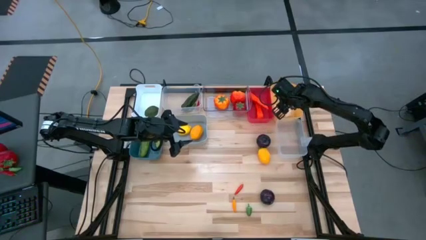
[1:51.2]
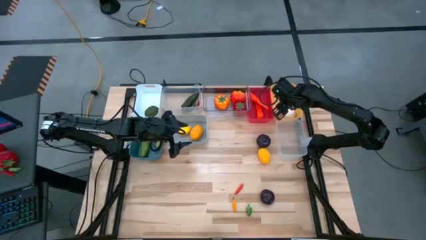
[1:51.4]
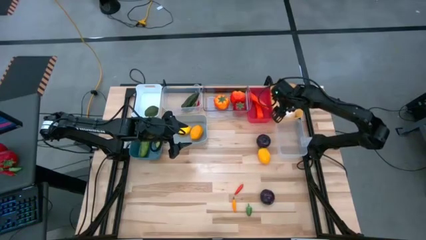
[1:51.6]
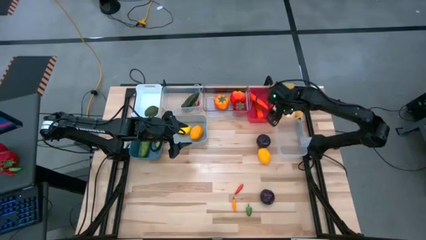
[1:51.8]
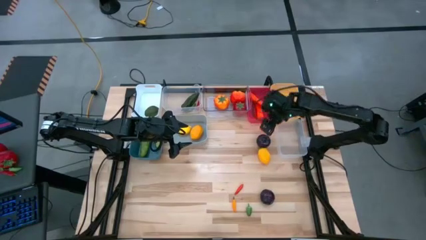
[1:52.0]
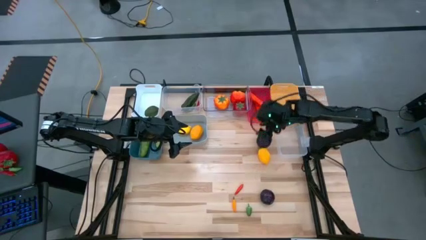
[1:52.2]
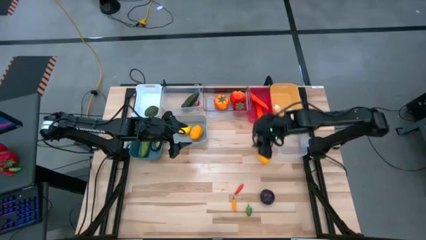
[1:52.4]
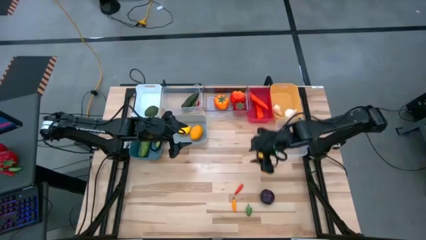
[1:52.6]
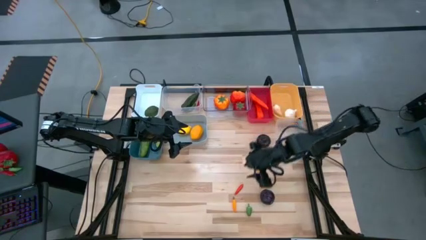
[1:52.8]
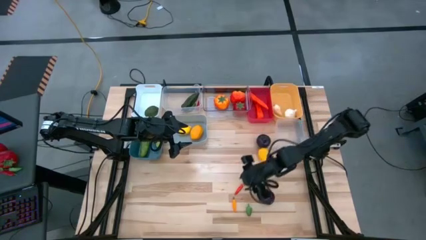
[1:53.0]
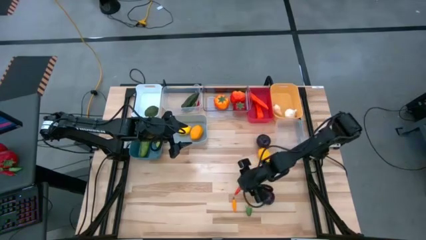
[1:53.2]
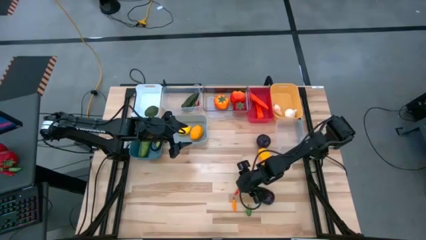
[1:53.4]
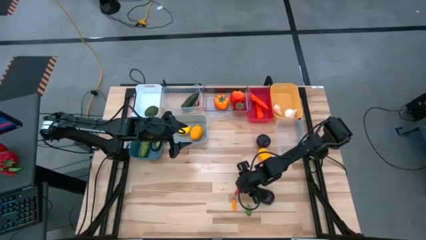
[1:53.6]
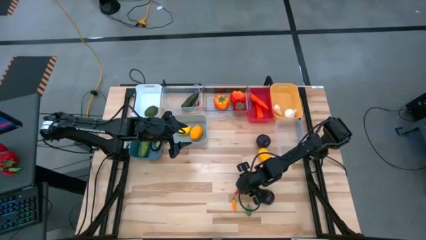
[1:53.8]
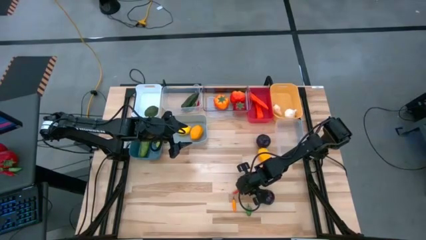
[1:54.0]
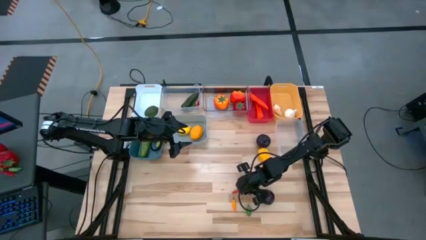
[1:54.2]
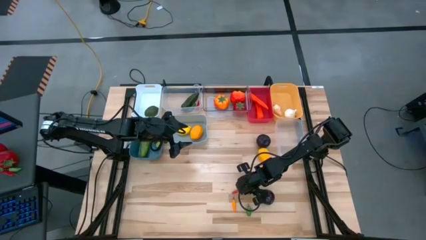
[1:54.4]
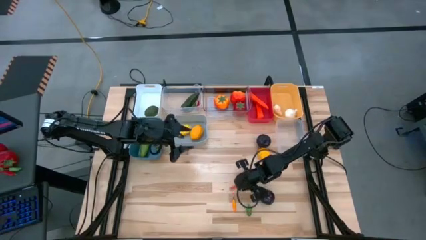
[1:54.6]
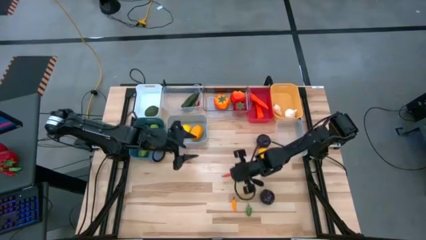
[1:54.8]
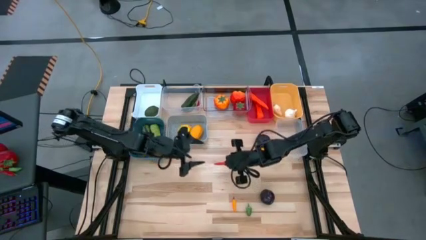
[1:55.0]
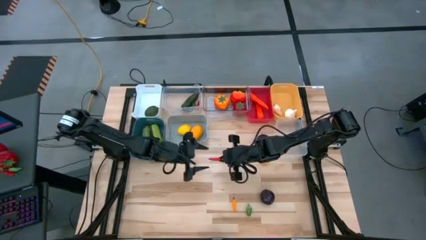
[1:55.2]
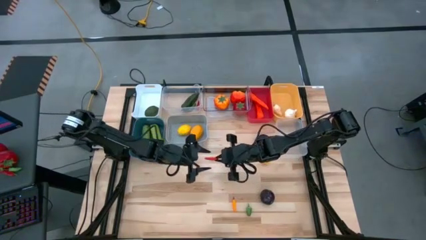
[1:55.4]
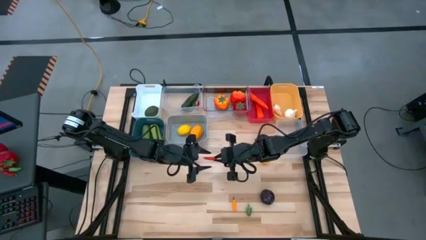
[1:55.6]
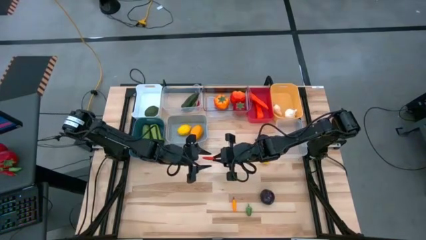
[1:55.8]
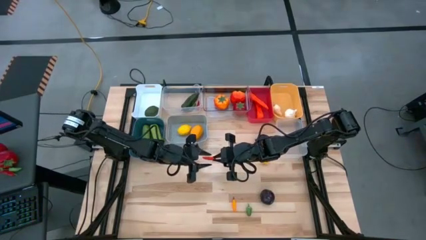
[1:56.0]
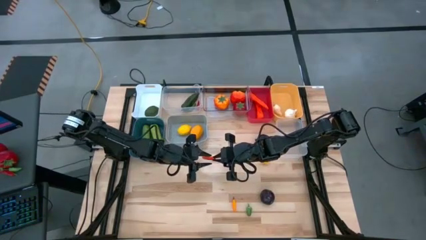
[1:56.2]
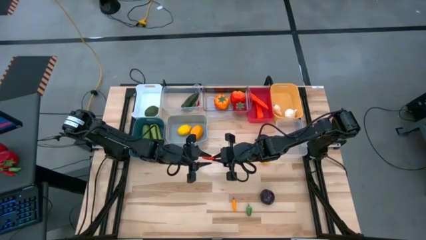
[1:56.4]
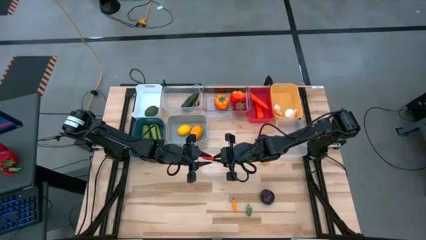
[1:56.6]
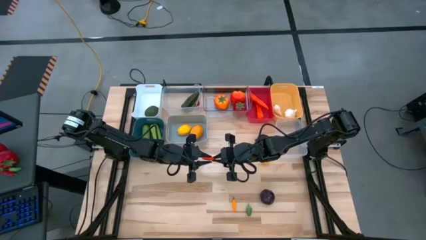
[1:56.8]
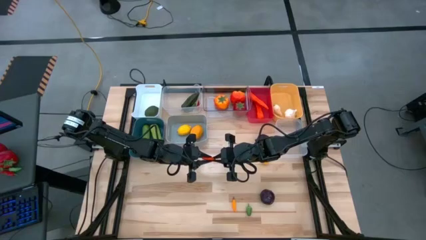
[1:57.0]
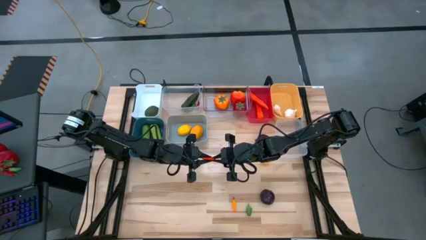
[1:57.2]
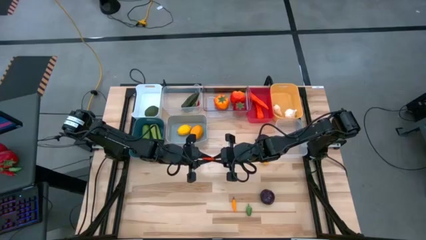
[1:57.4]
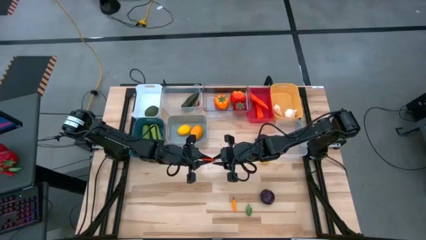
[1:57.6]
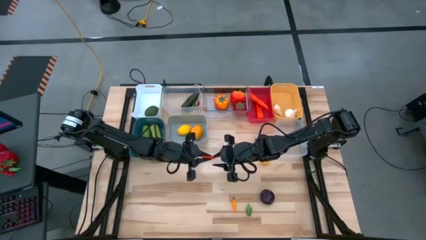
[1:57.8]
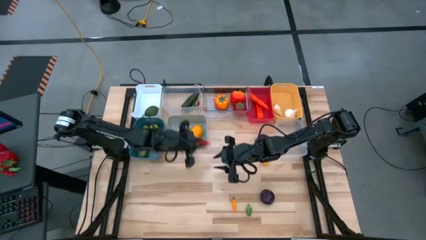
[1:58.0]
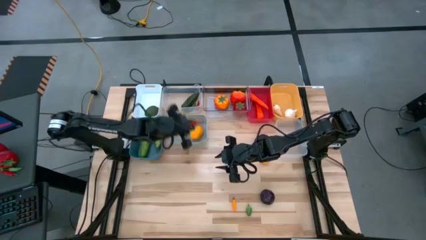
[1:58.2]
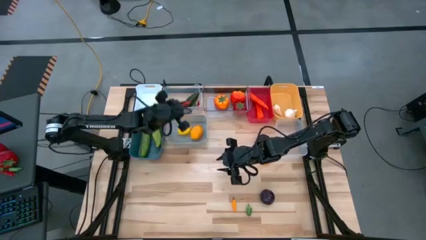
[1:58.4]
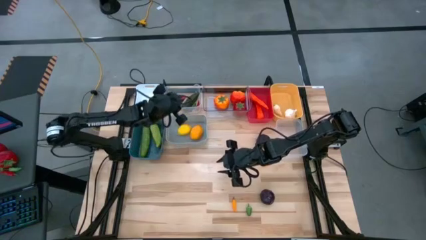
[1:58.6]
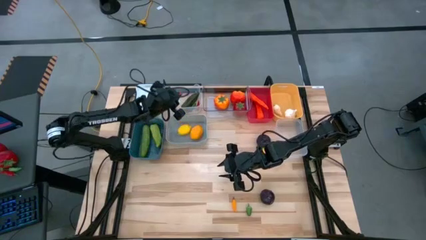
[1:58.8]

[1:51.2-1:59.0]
Task: Sort produce into baskets
Put the orange chili pepper into the top left transparent bin

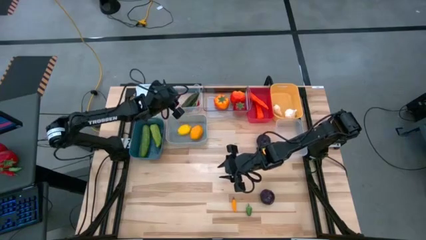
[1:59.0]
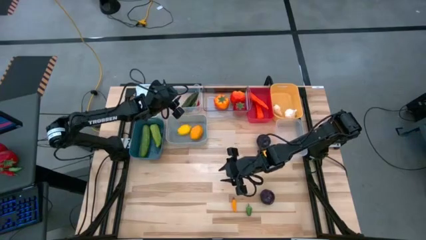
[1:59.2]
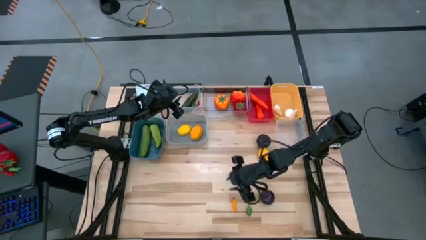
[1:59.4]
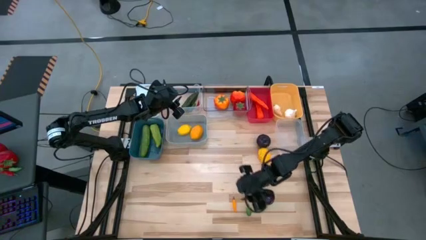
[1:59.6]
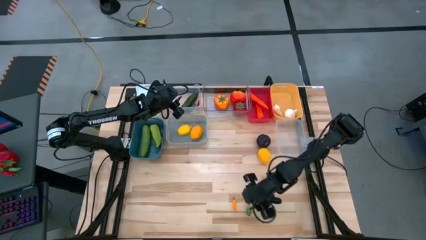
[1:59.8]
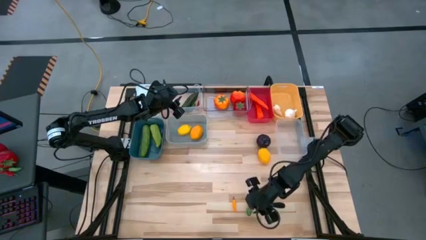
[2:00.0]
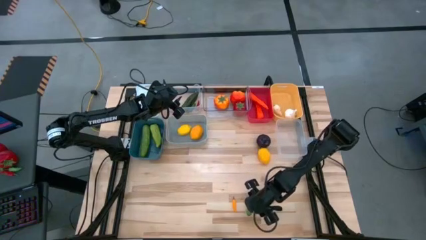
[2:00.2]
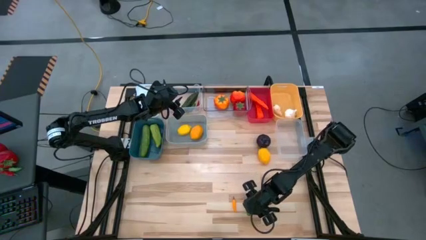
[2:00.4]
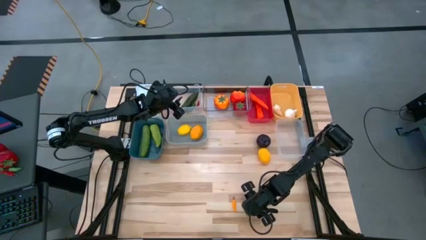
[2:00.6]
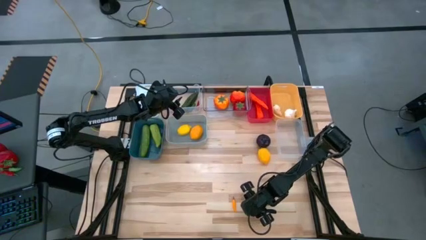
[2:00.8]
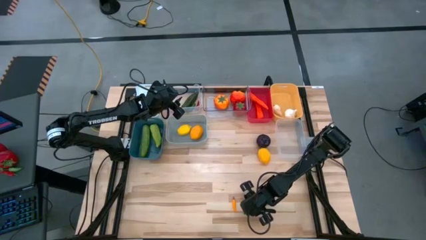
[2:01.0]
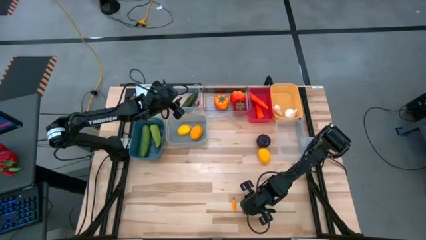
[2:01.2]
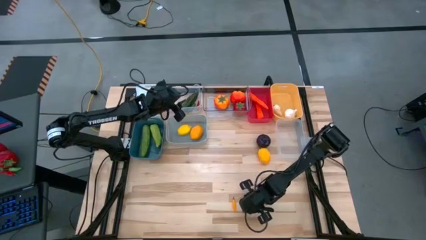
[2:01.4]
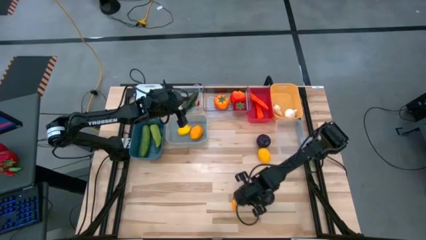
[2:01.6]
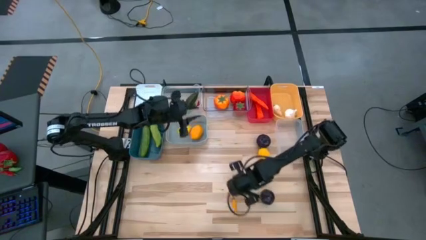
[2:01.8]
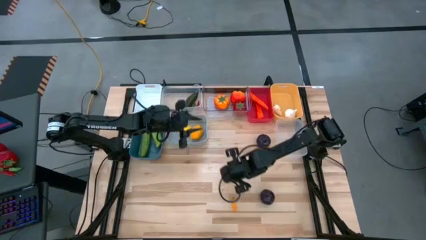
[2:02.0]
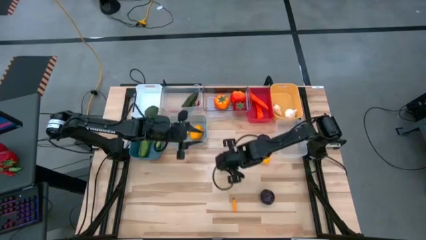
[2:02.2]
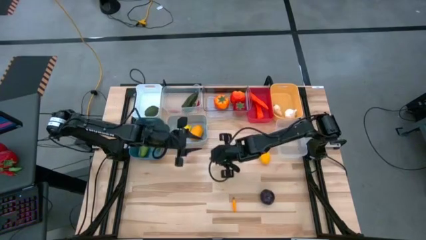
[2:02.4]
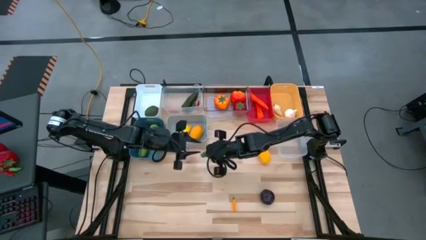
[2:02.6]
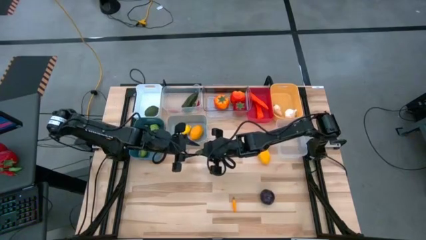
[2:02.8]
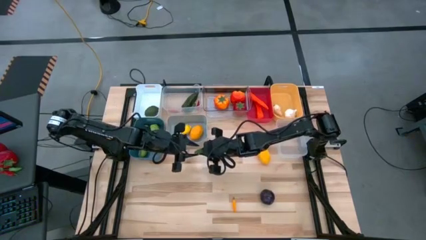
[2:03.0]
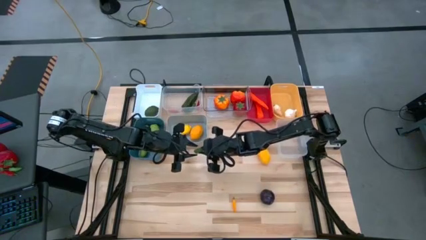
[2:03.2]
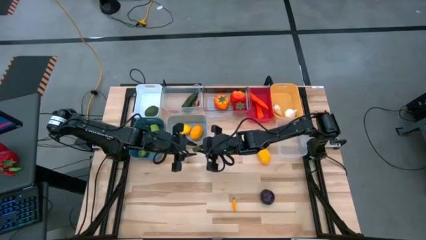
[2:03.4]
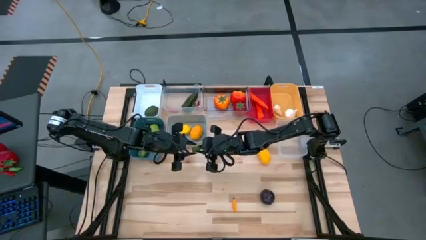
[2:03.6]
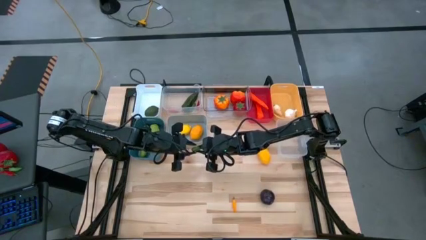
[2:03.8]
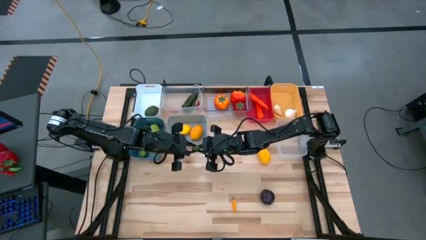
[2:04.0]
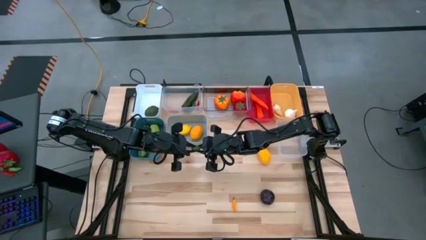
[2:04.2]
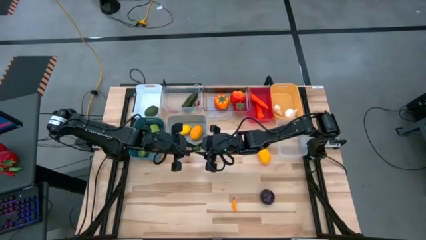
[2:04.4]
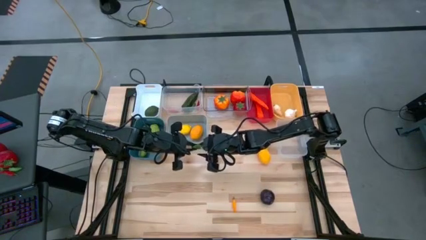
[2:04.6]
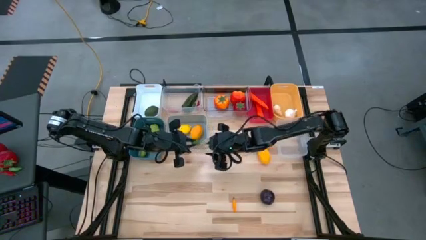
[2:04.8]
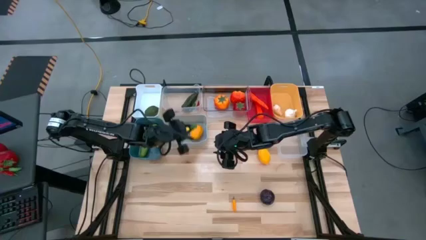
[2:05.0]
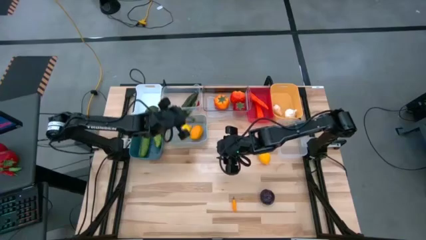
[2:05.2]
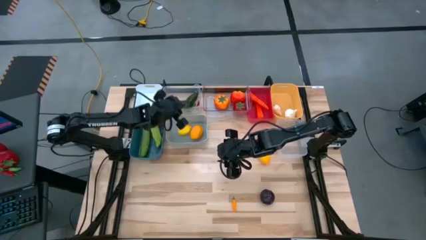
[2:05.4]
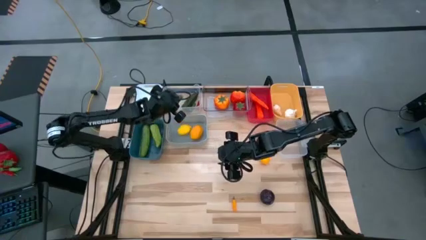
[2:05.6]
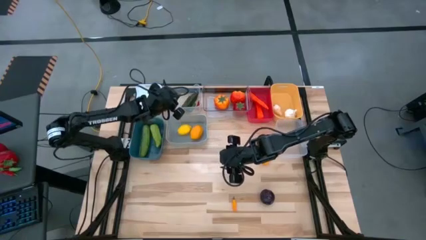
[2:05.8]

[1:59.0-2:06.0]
Put the green chili pepper into the top left transparent bin

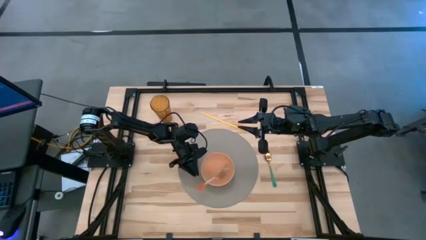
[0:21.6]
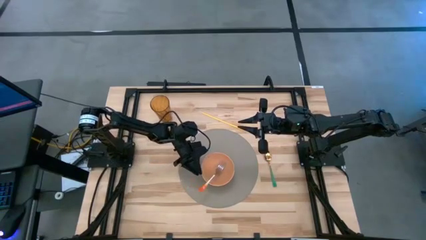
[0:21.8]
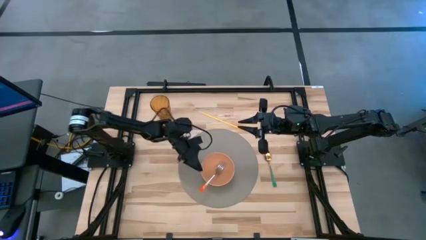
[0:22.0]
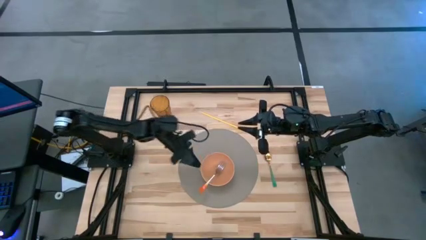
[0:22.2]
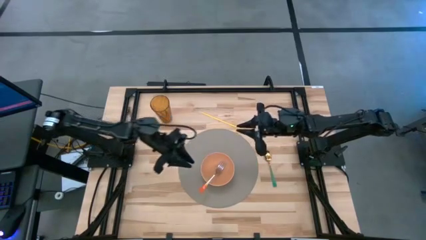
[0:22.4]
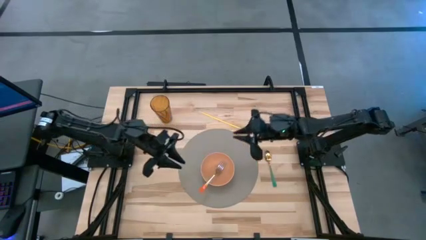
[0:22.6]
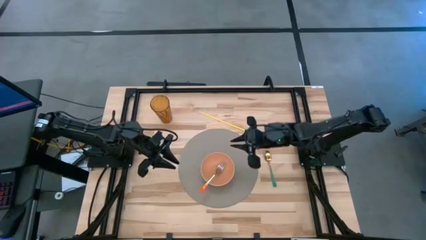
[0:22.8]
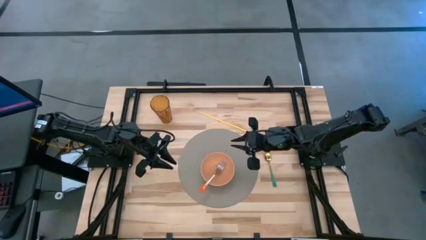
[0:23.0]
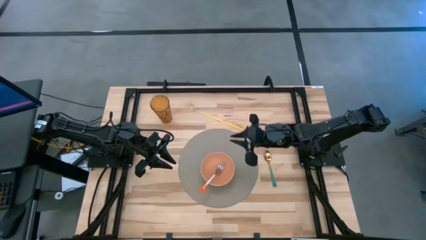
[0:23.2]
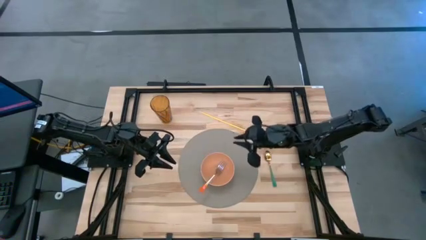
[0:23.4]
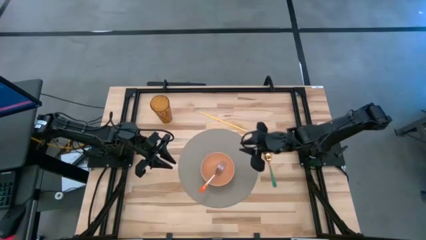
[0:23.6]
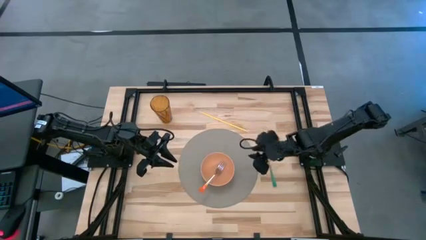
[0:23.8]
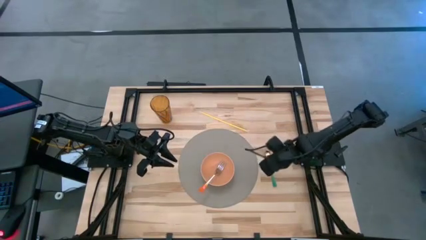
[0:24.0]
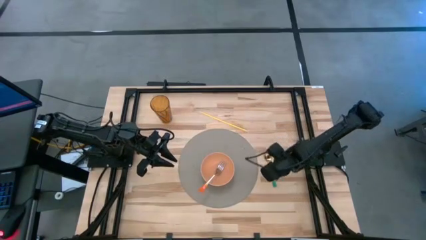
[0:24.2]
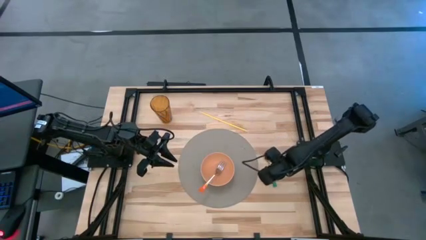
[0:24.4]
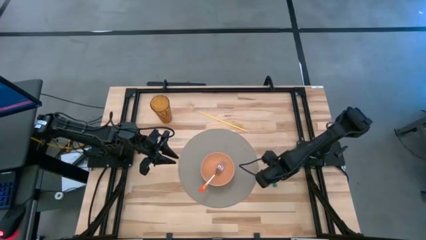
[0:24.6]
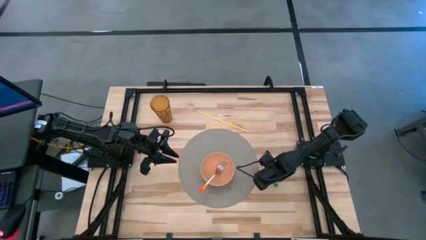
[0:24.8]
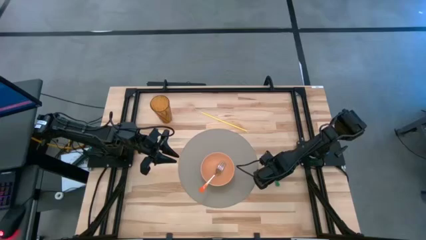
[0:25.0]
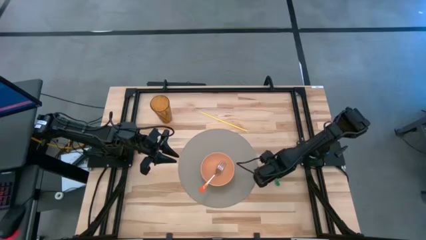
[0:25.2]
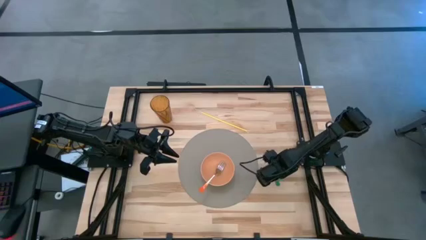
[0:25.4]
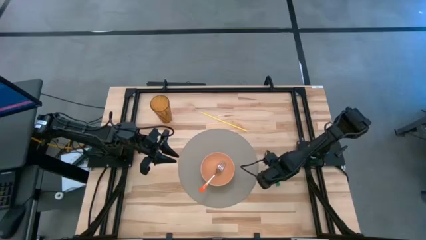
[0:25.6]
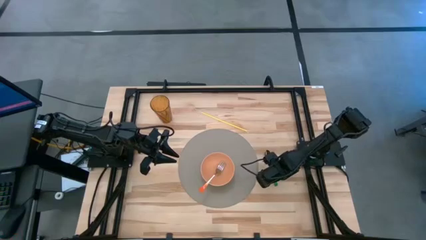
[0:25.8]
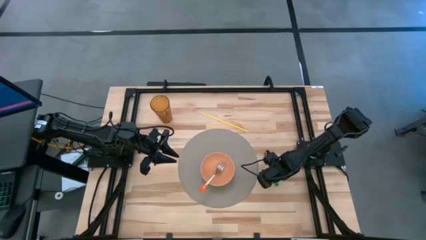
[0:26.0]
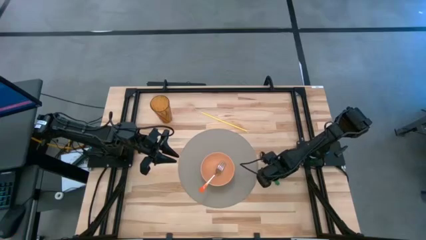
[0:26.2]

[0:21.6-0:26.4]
Task: Pick & Place Utensil
Put the green spoon into the orange bowl
